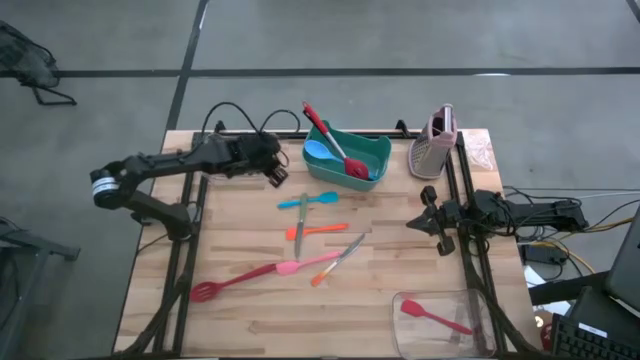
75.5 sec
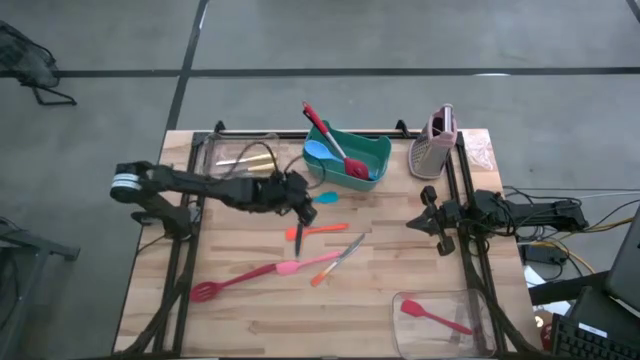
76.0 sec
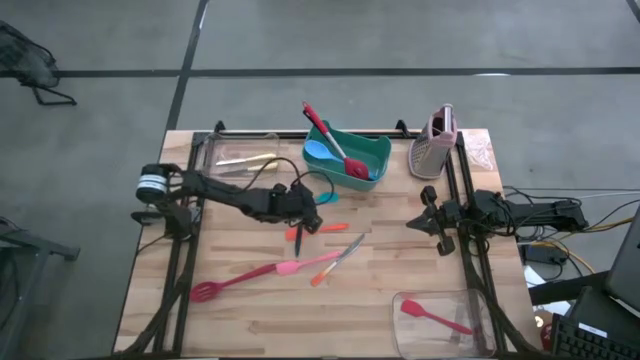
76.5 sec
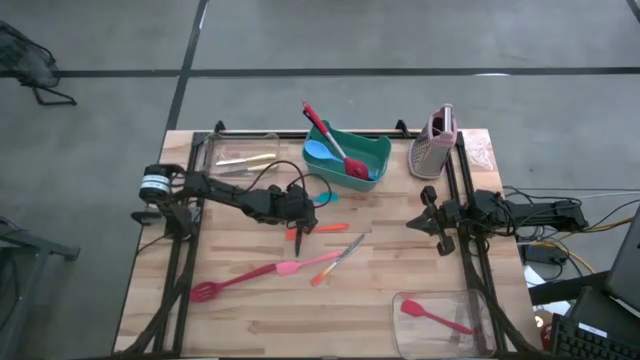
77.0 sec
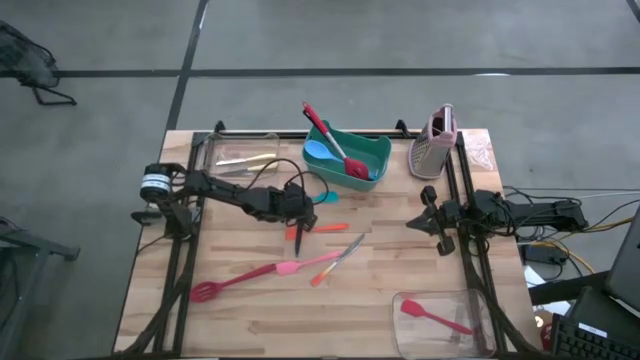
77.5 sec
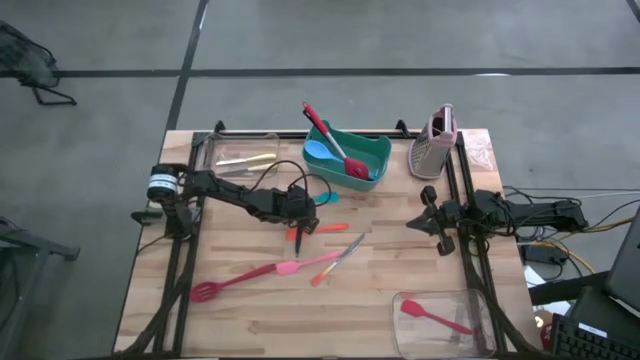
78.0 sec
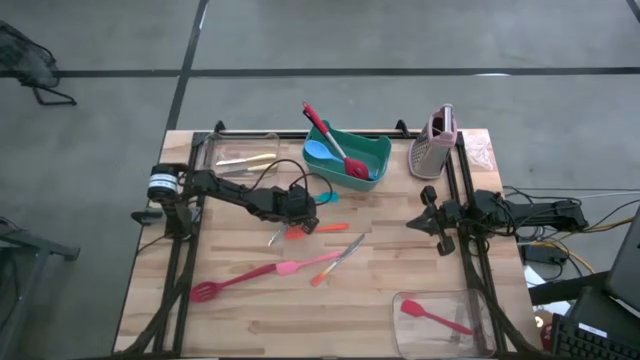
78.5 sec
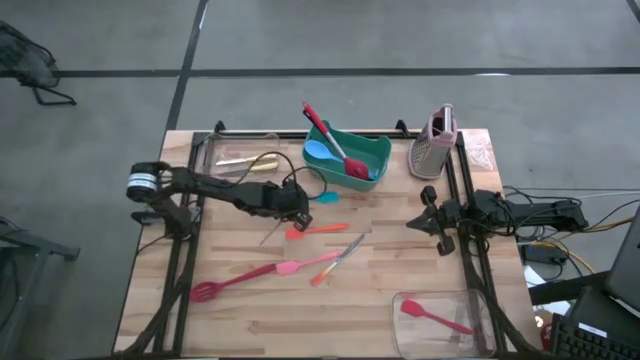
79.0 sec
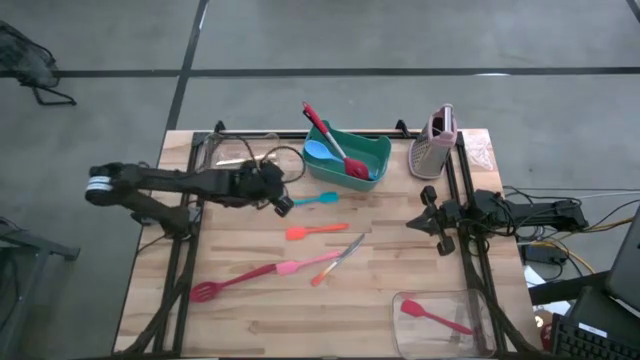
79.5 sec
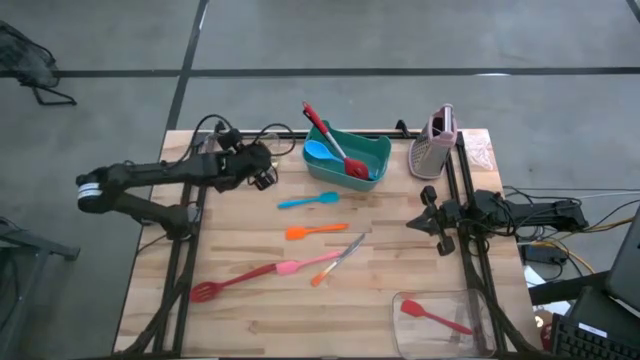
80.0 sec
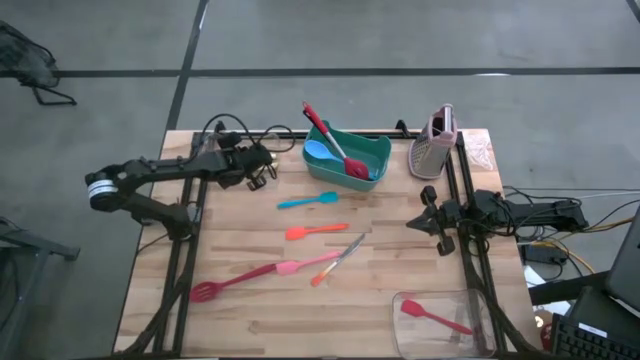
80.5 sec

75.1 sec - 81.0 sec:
Task: Pick & Place Kitchen Items
Put the green table knife into the top transparent bin

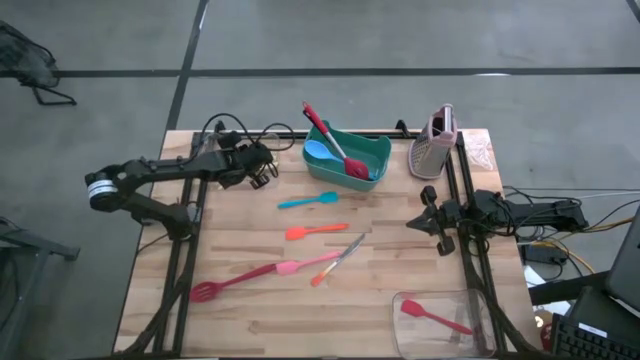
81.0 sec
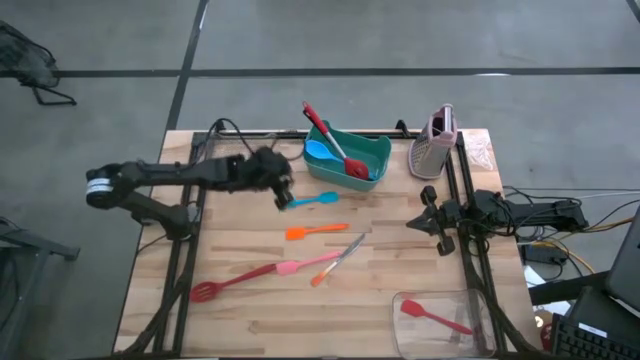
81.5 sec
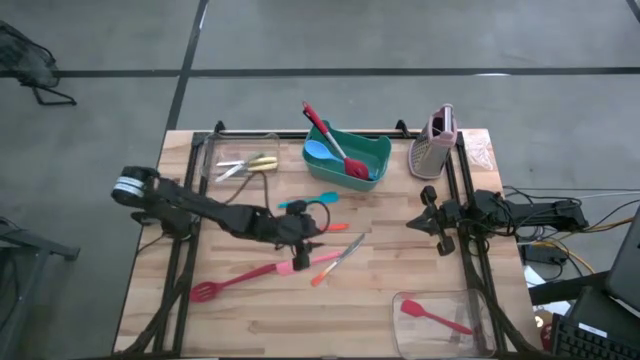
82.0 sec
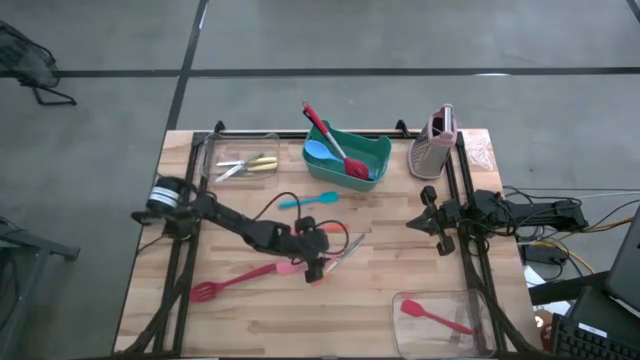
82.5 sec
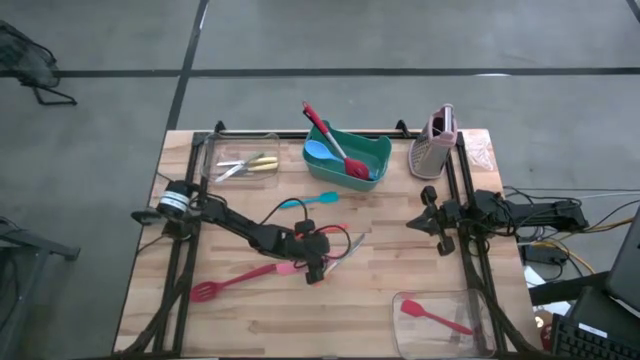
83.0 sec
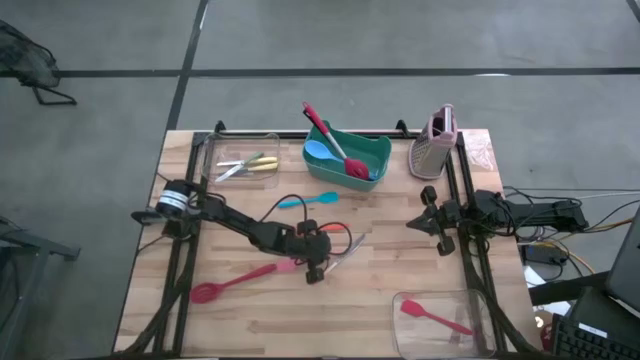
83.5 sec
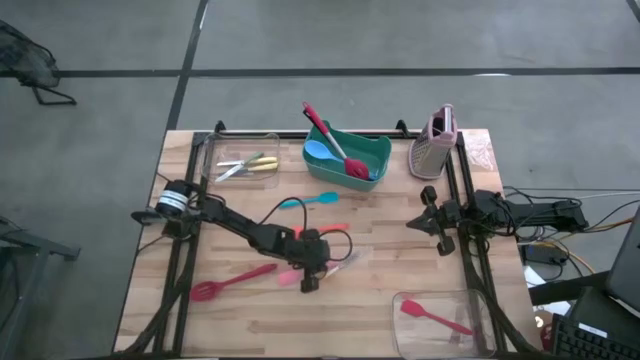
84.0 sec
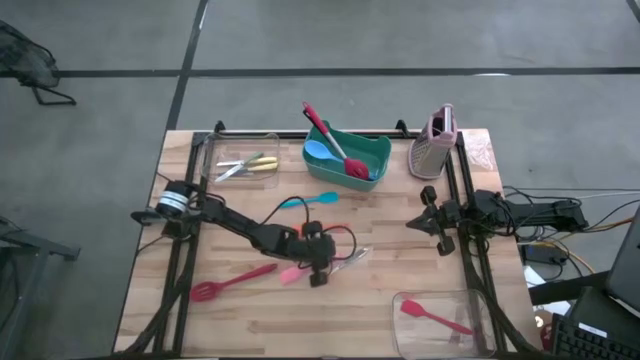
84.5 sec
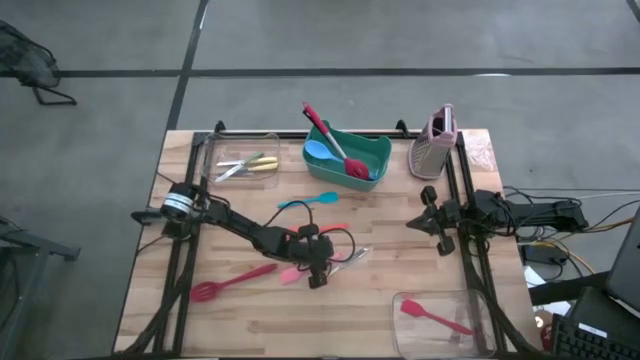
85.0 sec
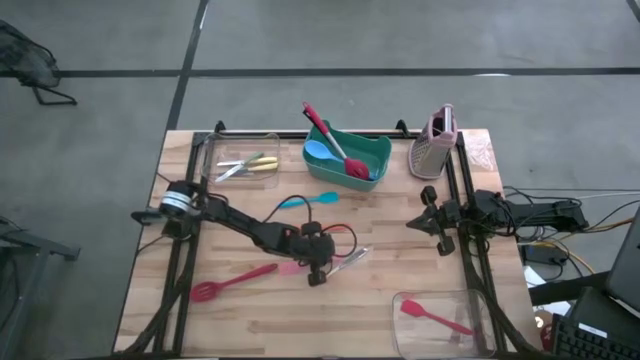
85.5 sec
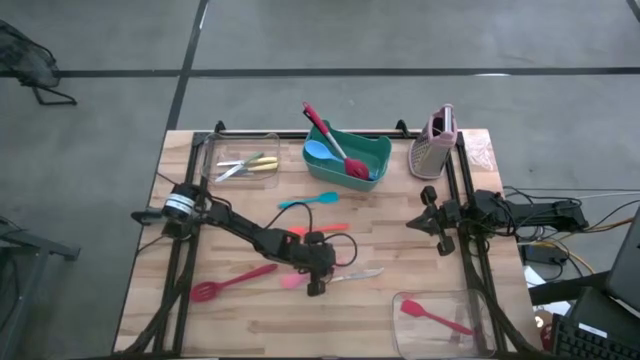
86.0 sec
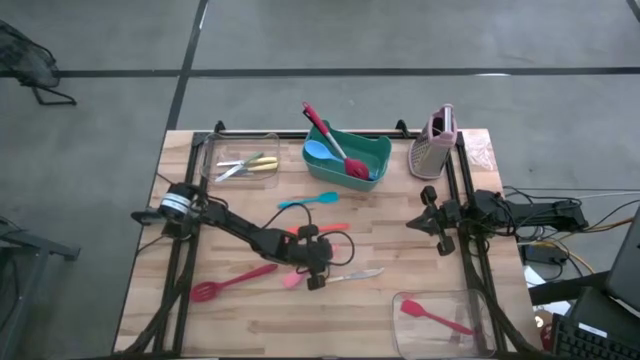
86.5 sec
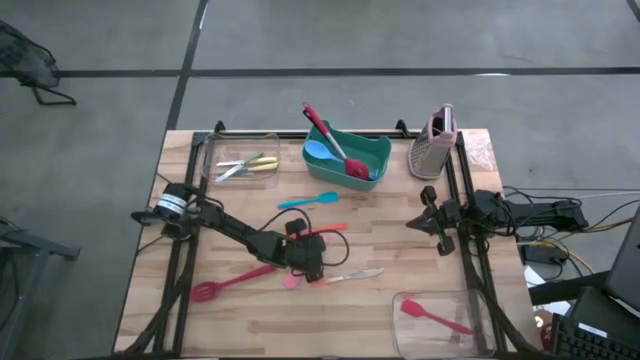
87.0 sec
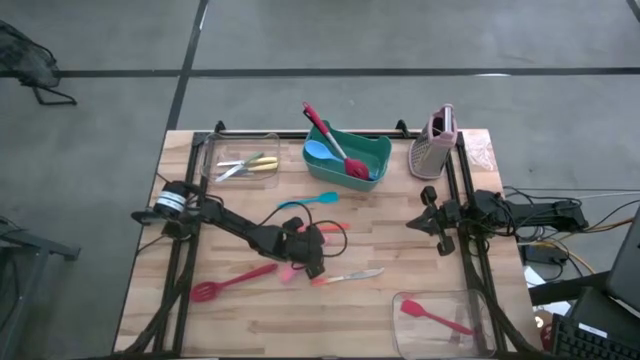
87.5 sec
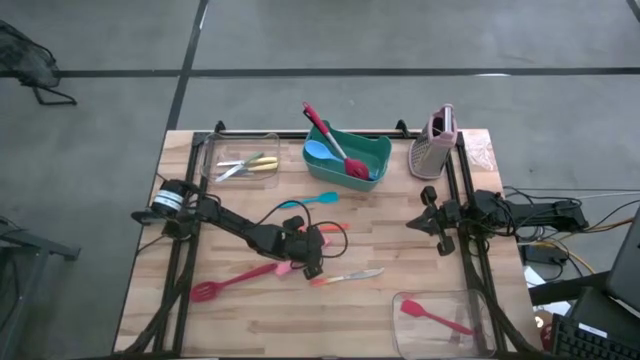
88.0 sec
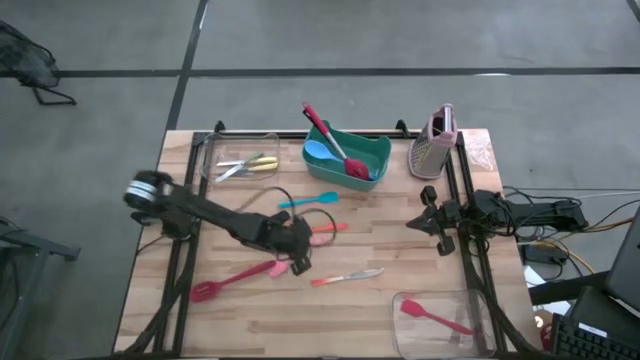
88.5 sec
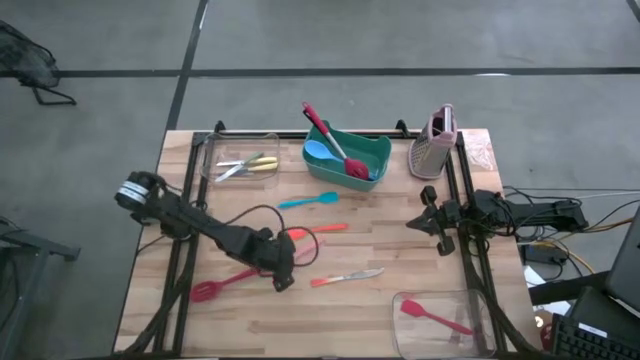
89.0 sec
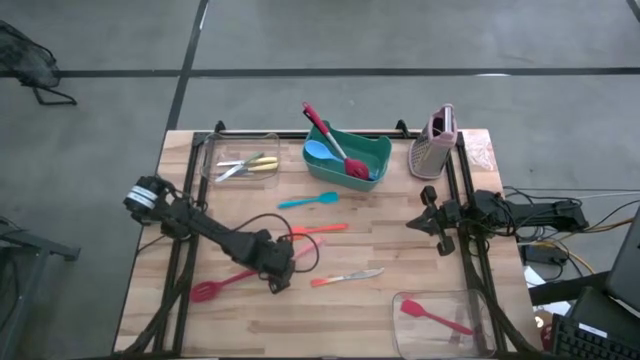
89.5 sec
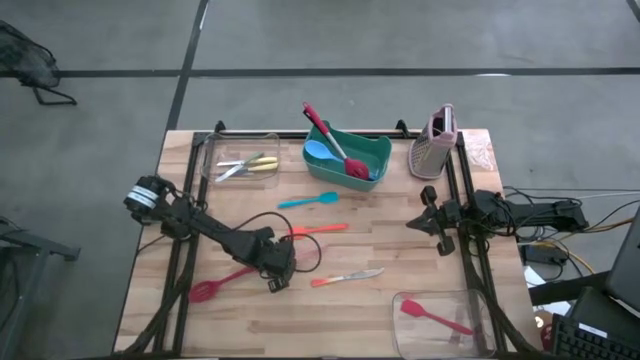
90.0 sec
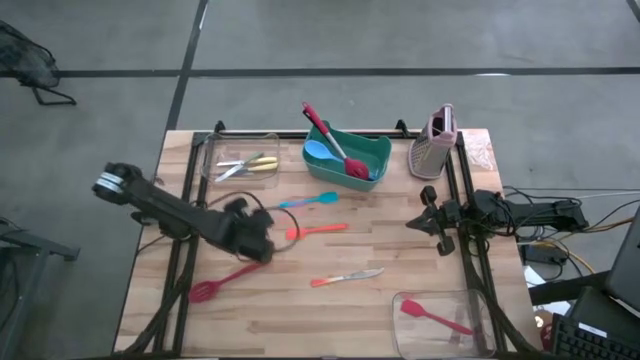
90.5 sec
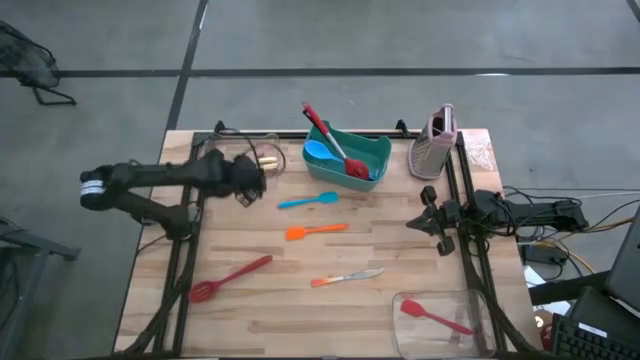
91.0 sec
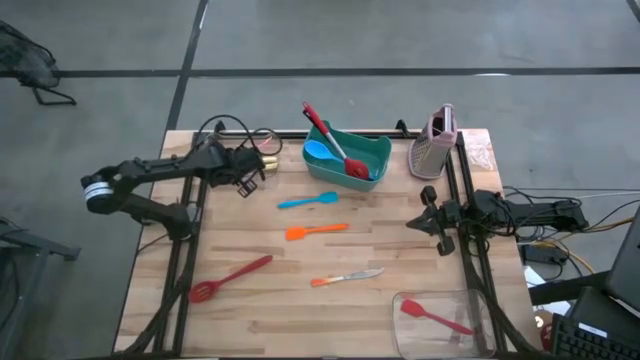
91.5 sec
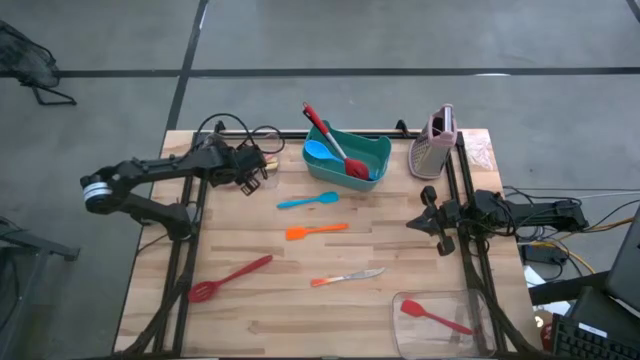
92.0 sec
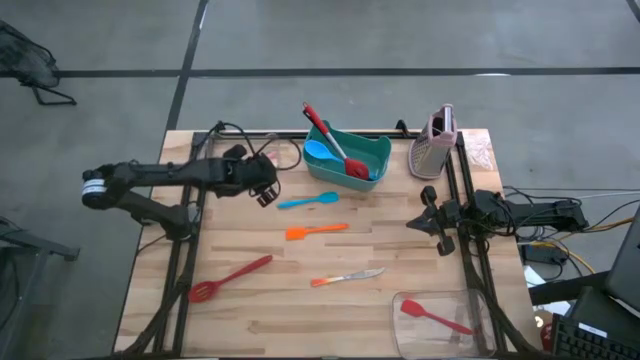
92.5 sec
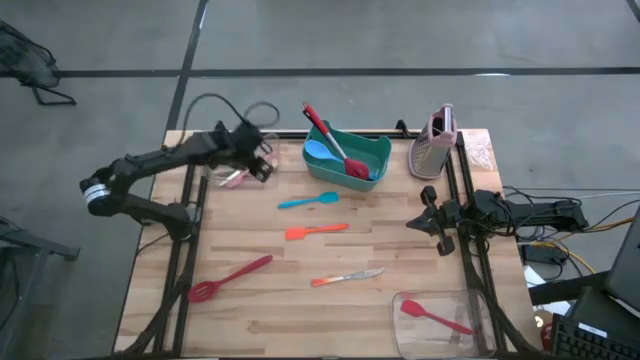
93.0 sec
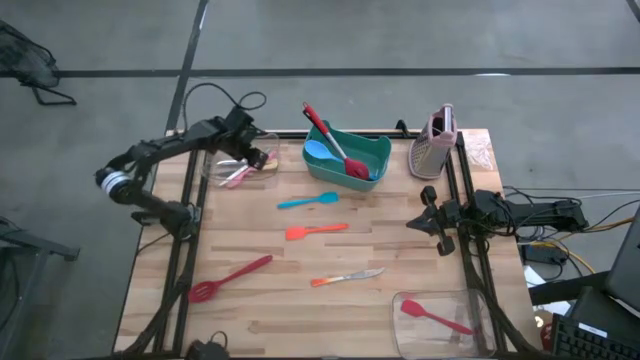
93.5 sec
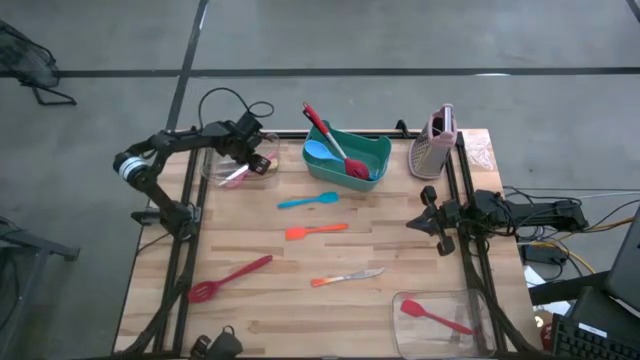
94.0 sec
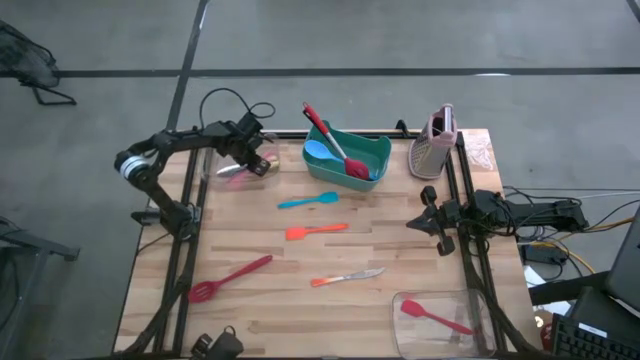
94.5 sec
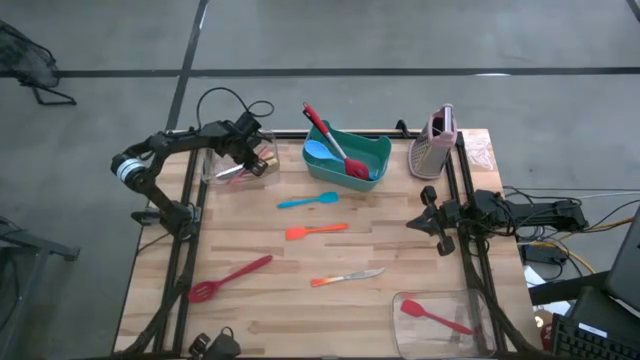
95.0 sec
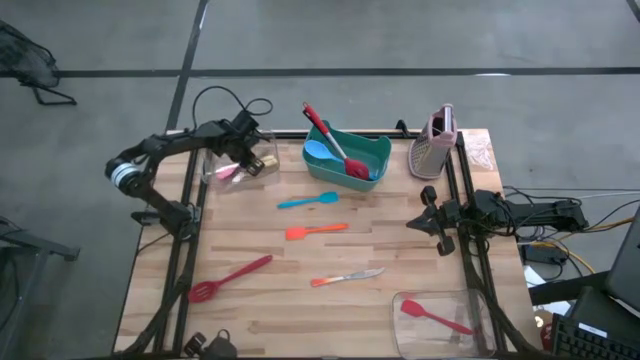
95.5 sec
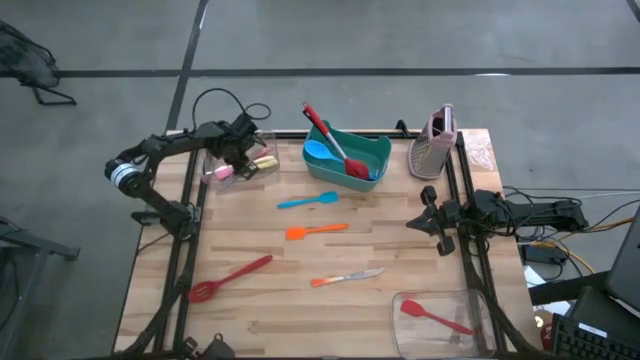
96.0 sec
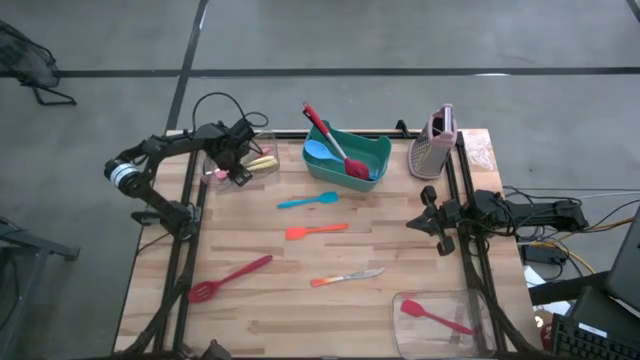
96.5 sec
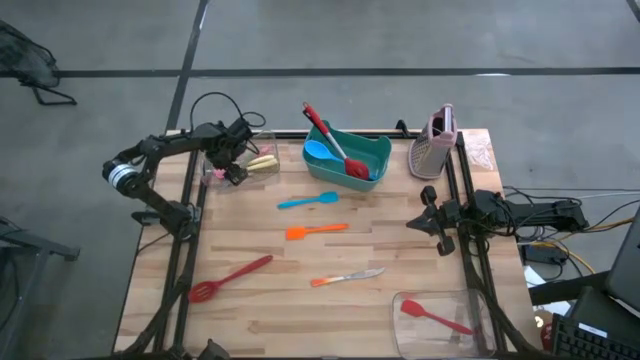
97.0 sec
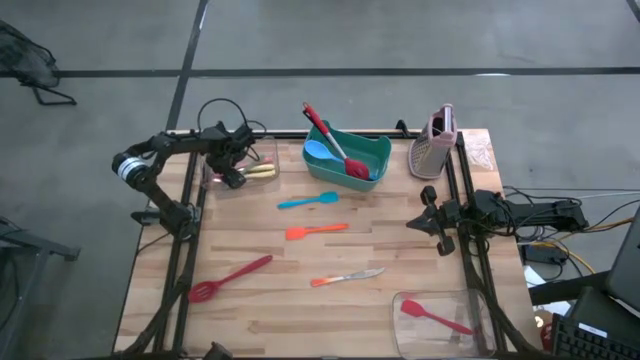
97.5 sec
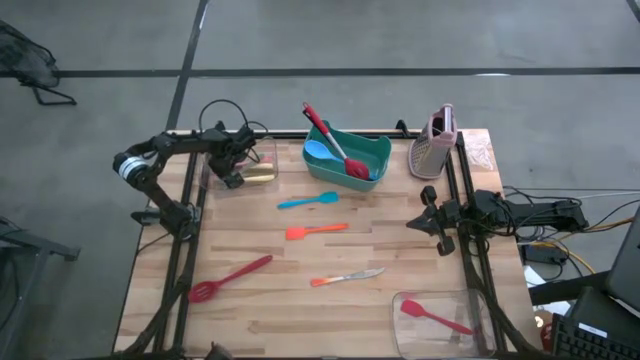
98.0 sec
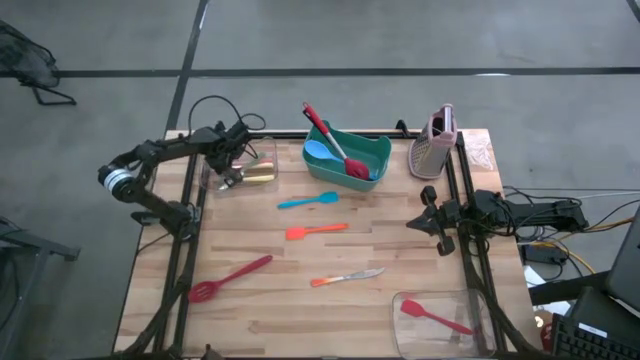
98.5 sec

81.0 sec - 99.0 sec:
Put the pink spatula into the bottom transparent bin
